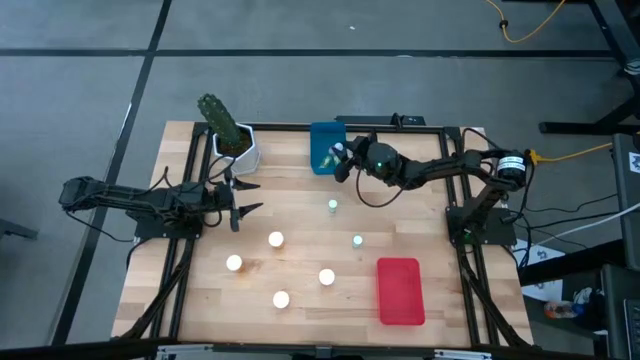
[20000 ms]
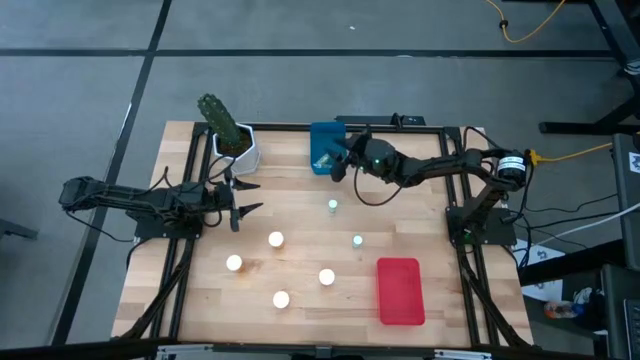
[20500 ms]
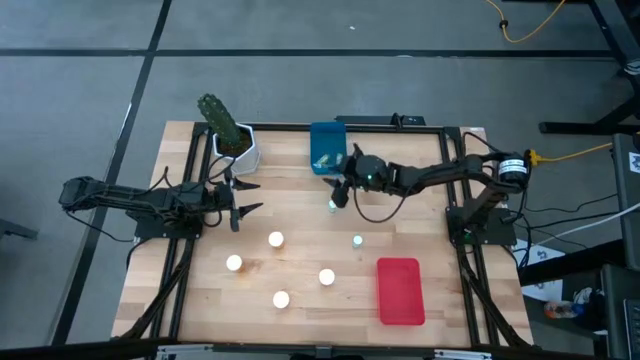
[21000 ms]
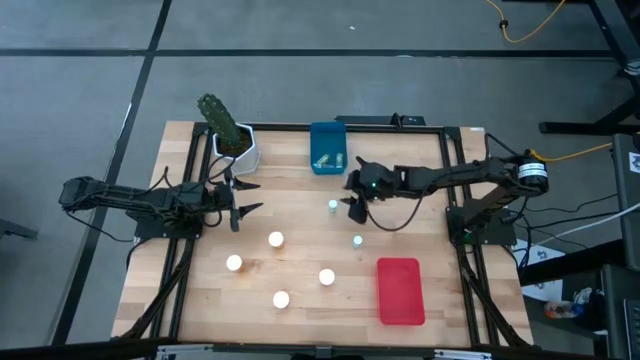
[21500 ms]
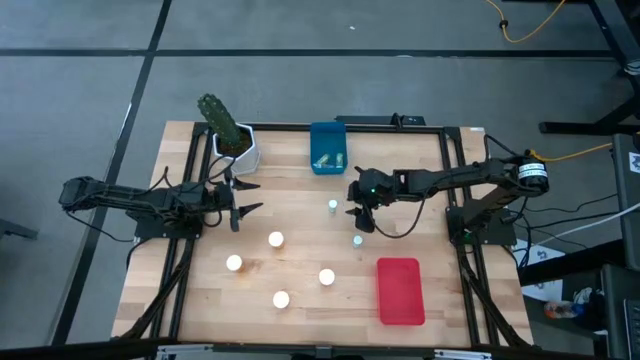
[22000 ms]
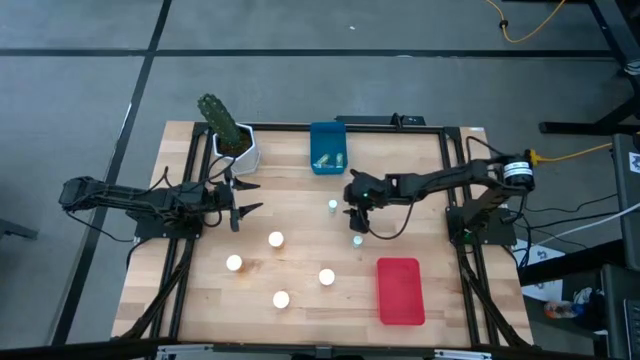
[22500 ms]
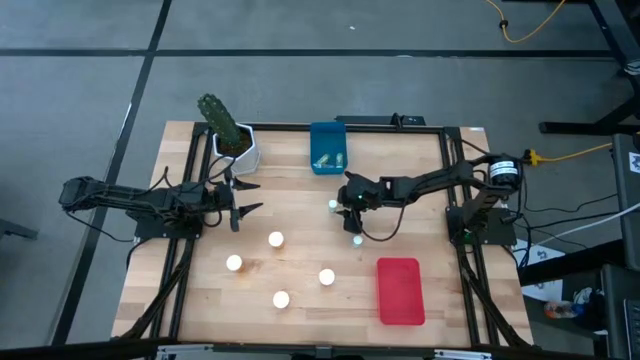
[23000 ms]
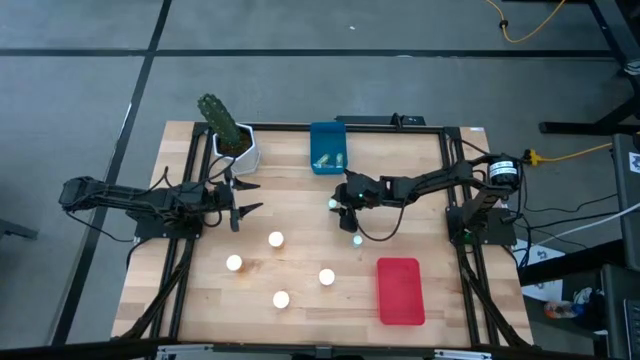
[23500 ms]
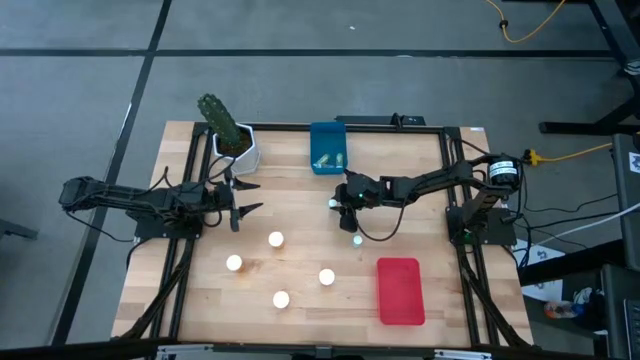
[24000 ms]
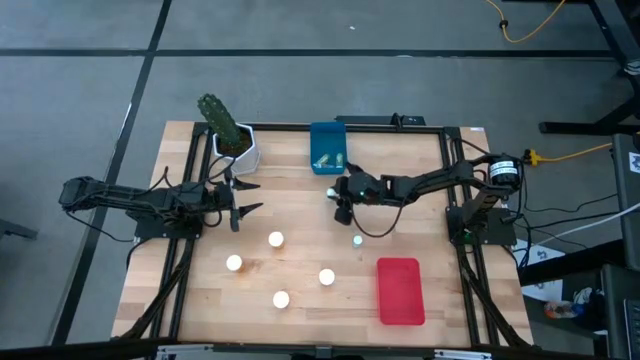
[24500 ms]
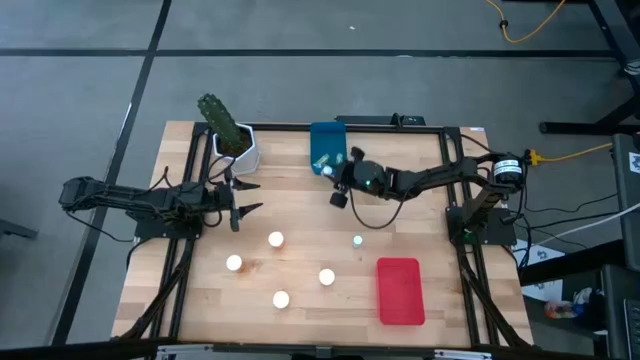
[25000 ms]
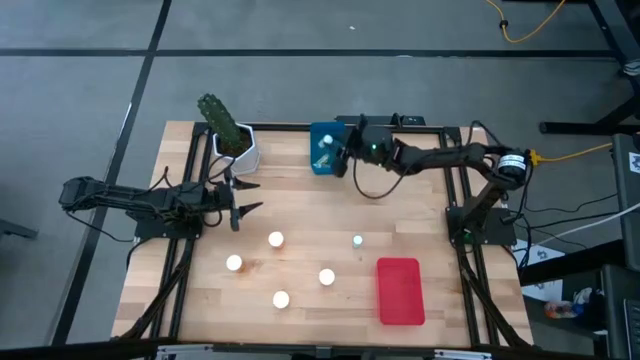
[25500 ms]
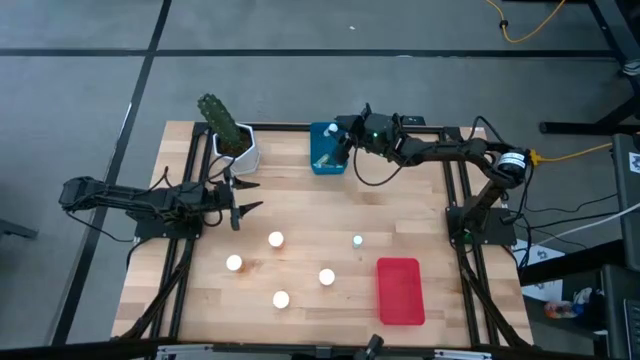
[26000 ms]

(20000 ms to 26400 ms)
Task: Pick and place medicine bottles into bin by pill shape (circle, oval)
Put the small green pill bottle into the blue bin

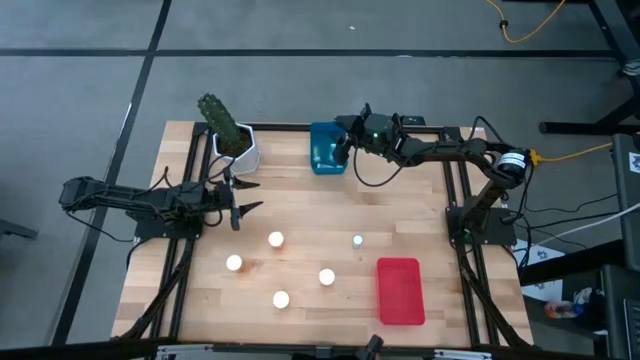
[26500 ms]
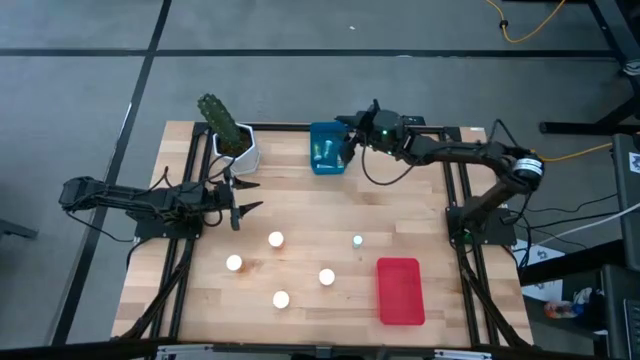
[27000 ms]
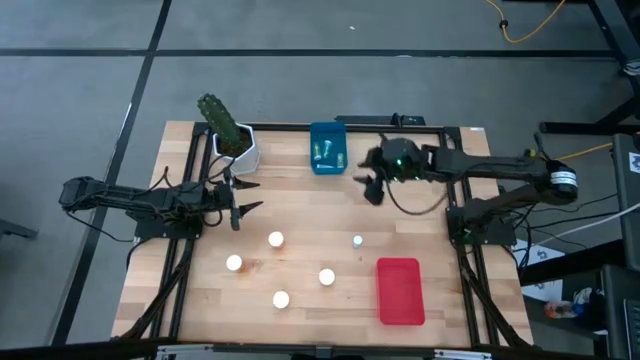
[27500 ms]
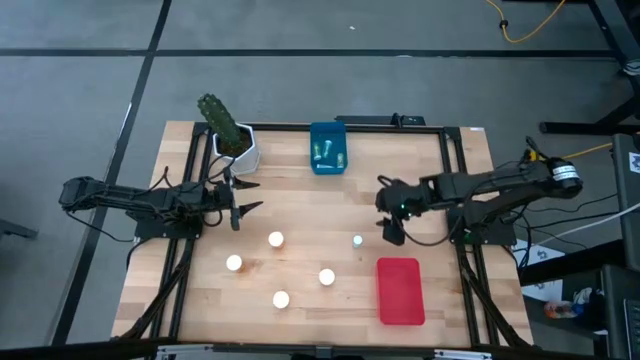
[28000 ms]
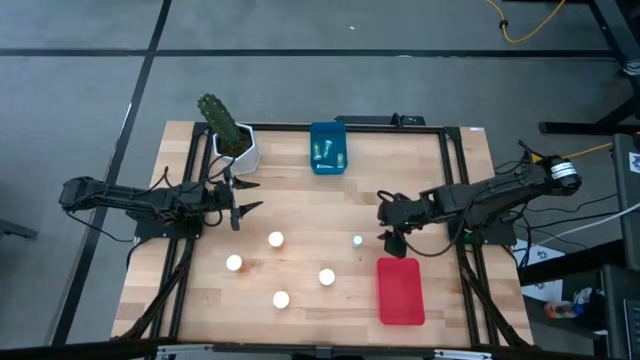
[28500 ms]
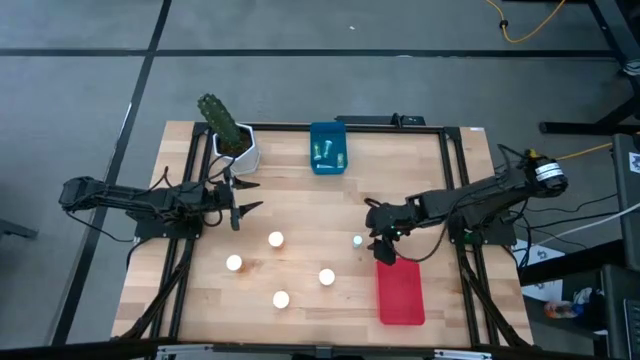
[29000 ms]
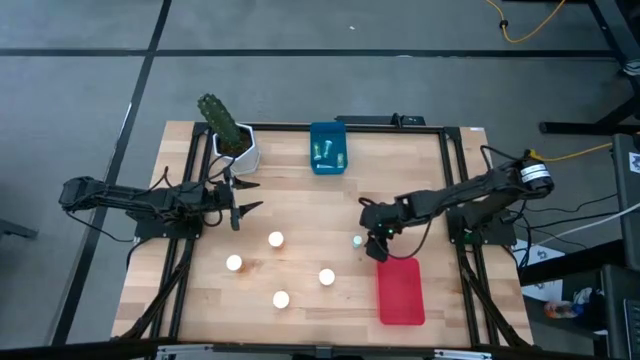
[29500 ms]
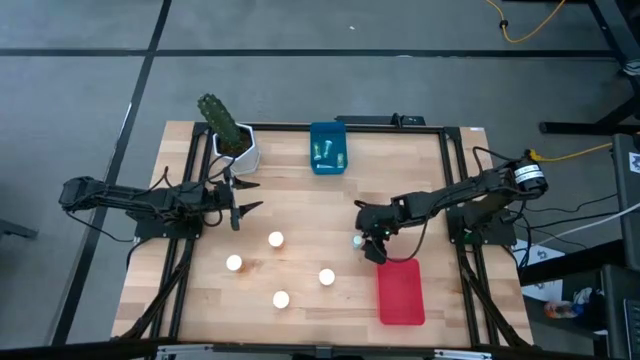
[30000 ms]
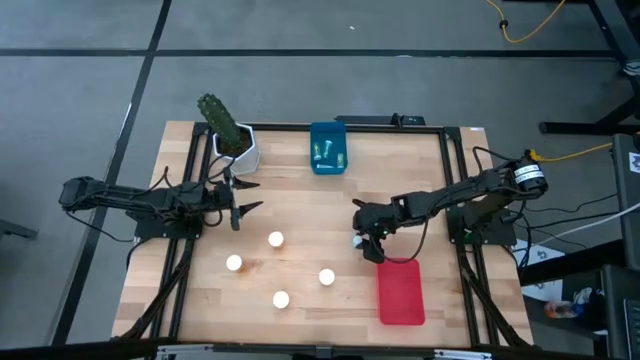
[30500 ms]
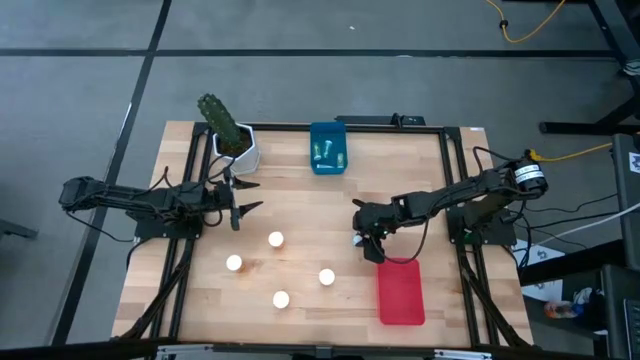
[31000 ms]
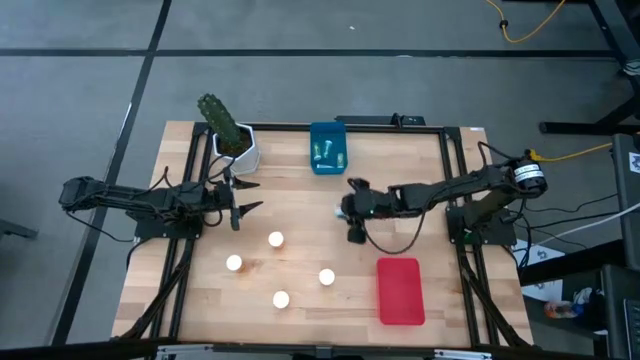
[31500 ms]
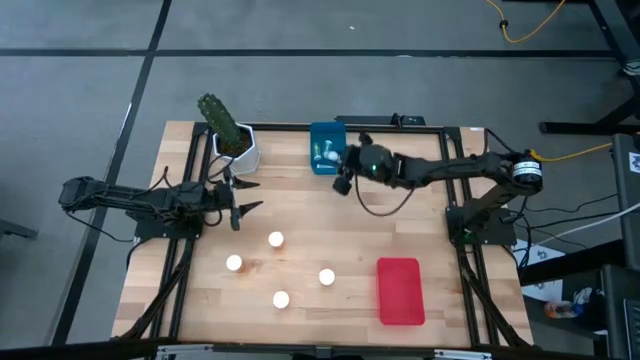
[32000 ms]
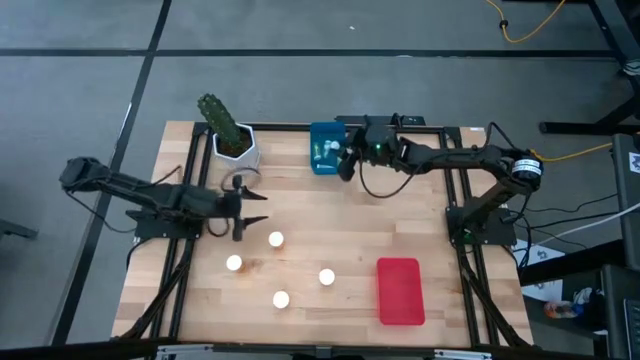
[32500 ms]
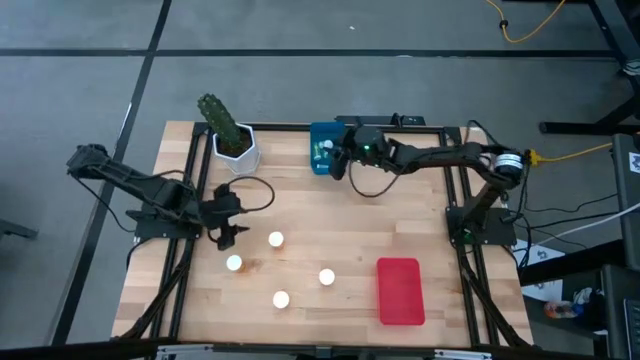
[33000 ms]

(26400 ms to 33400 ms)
Put the small green pill bottle into the blue bin

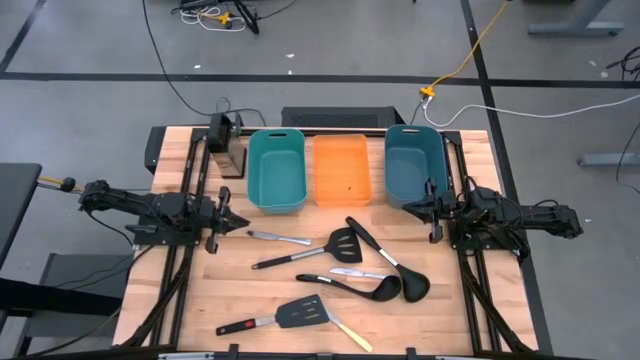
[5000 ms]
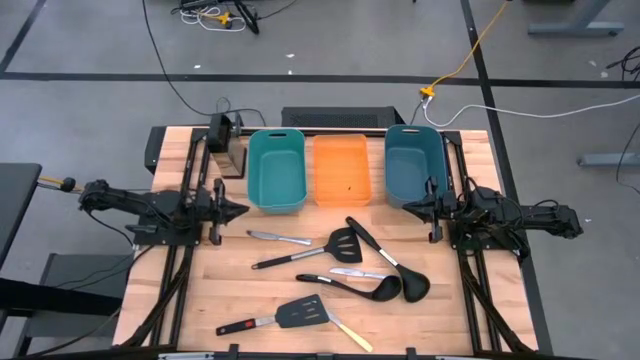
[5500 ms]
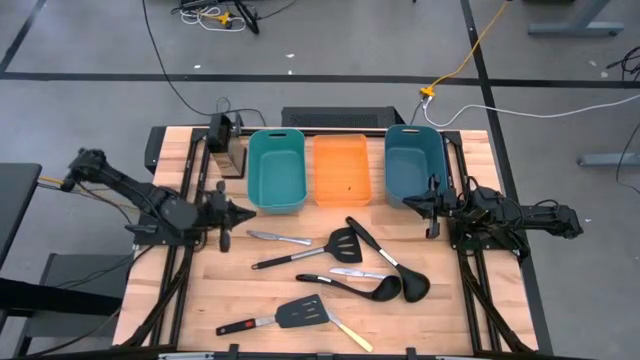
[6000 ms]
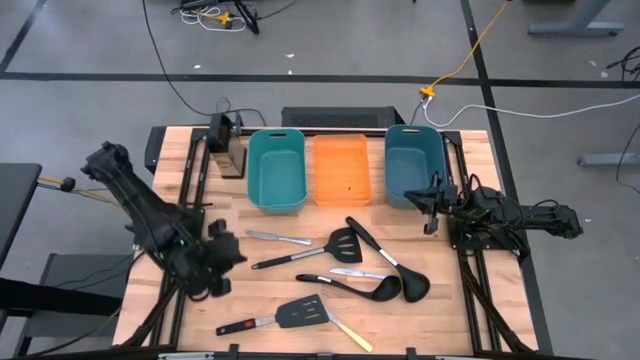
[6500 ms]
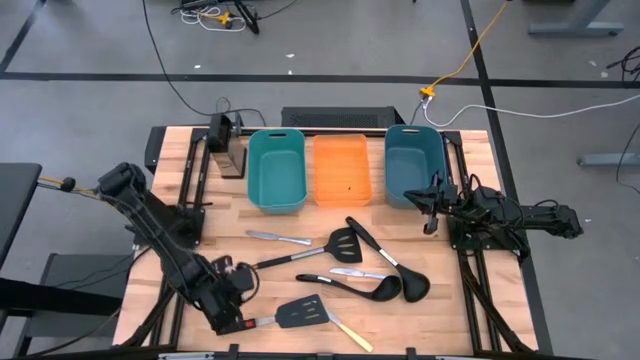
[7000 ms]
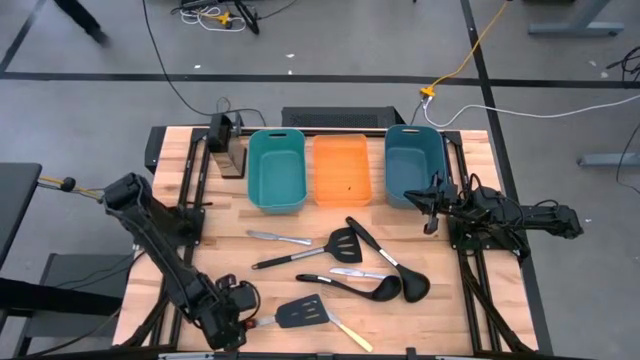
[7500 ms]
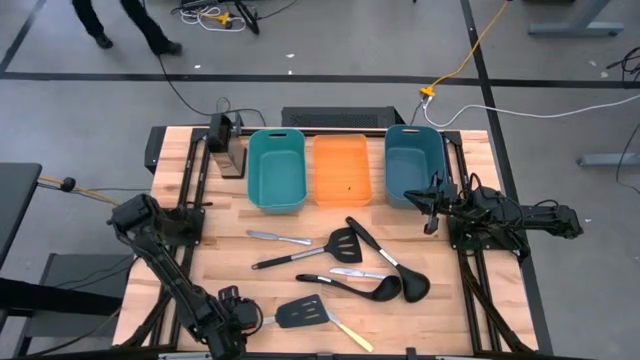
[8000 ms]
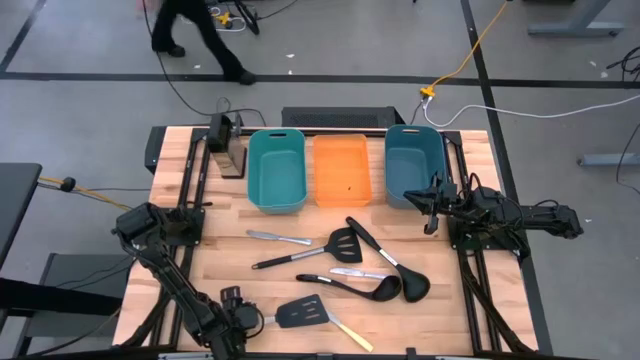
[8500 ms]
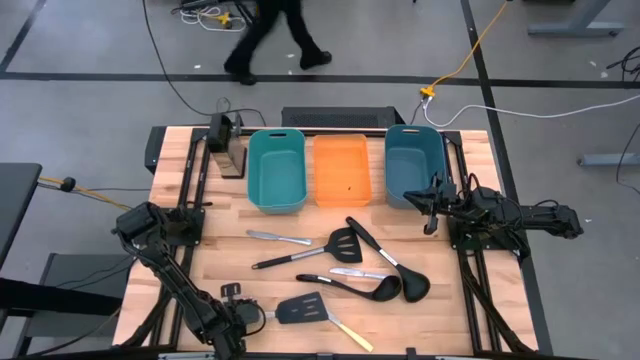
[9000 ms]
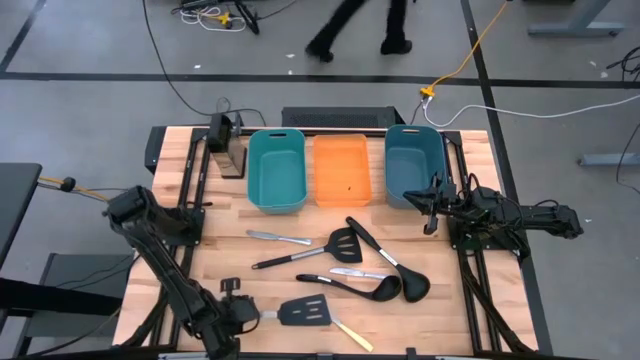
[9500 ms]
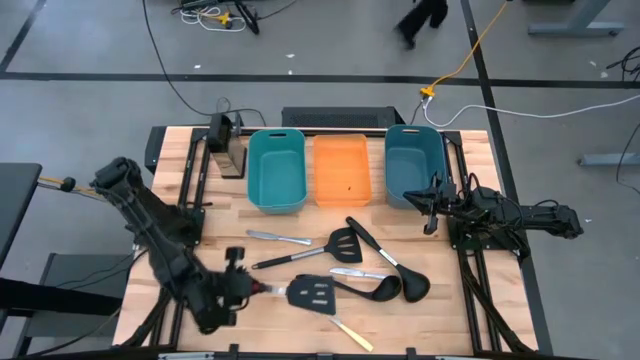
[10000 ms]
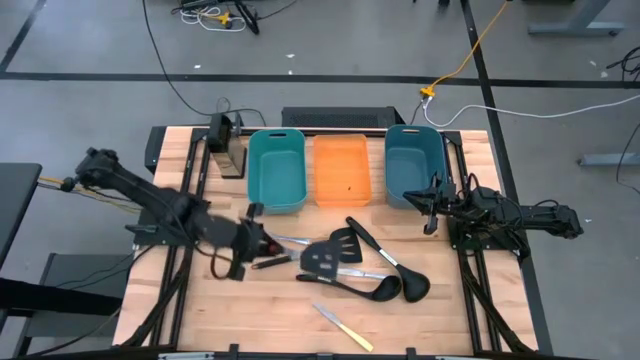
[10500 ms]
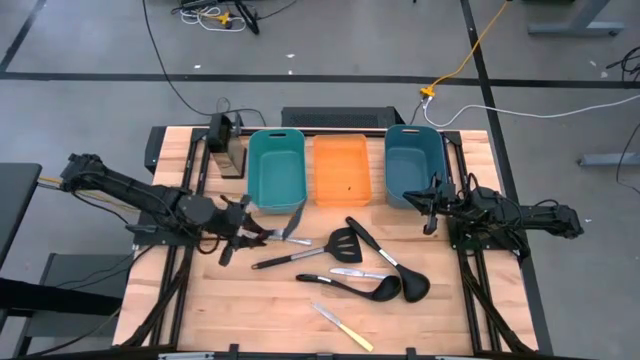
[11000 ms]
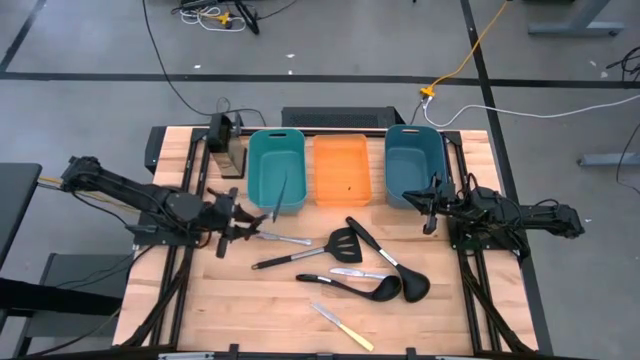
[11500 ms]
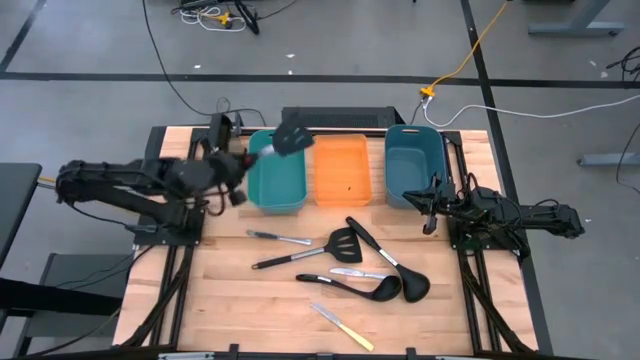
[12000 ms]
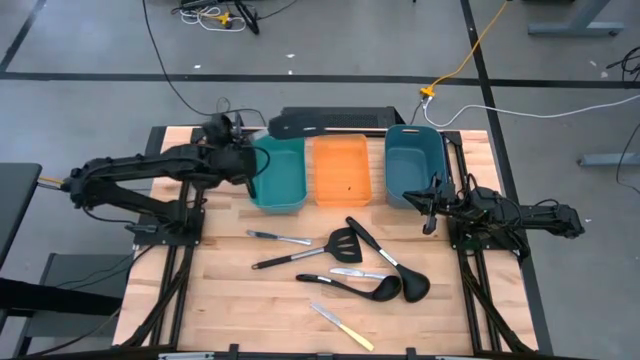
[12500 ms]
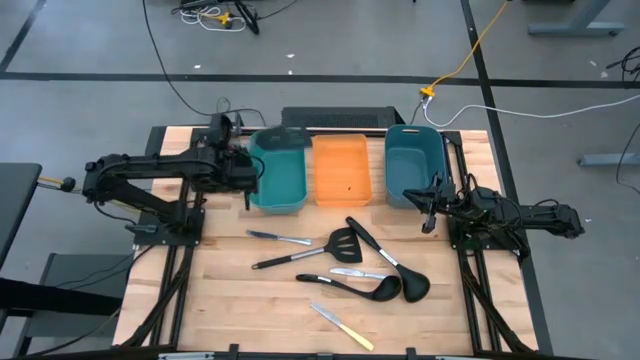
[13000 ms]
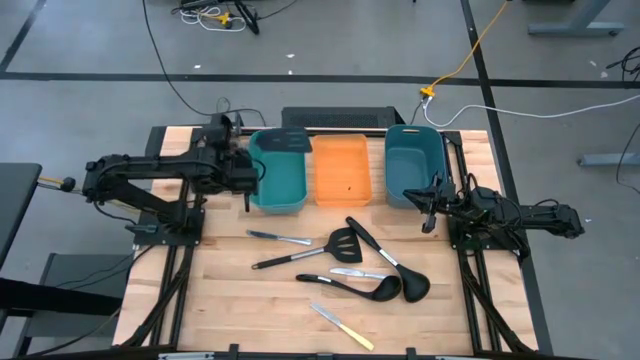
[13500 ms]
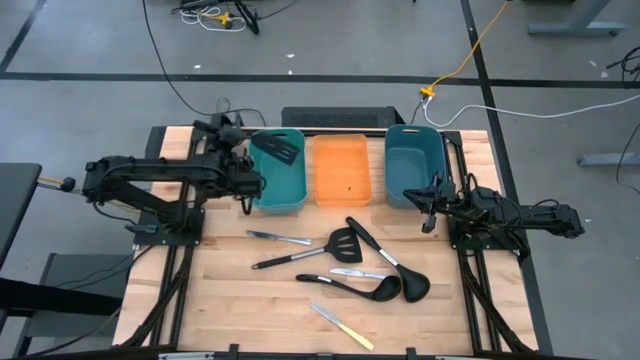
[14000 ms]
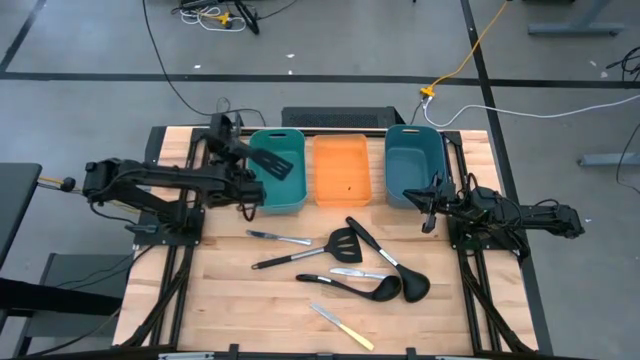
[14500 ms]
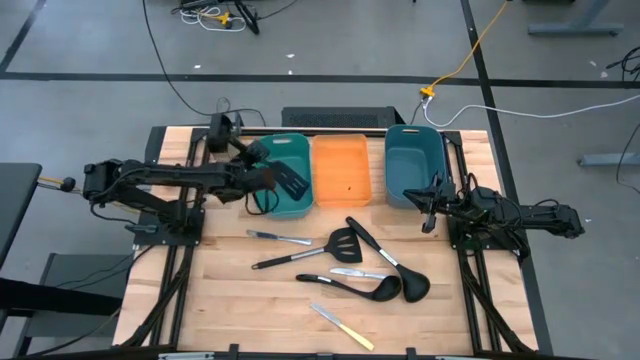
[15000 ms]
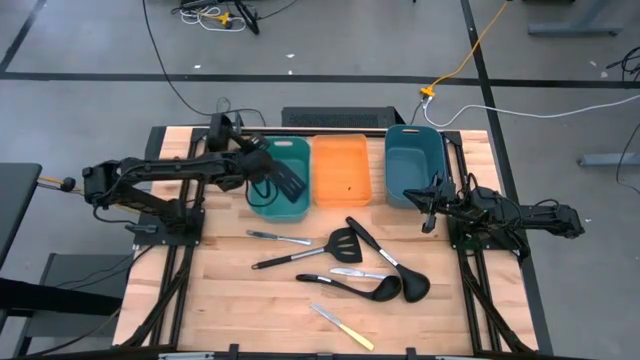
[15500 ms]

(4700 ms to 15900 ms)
Task: Pick & Place Kitchen Items
Put the bottom black spatula into the light green bin
